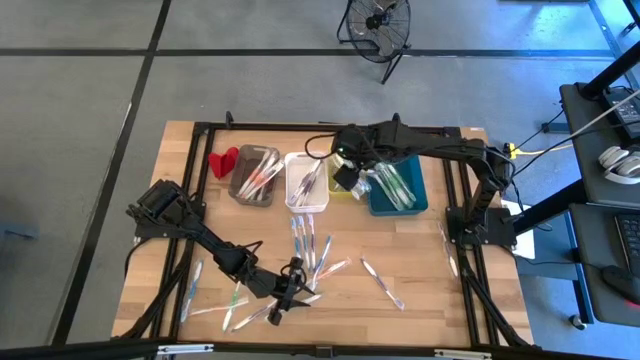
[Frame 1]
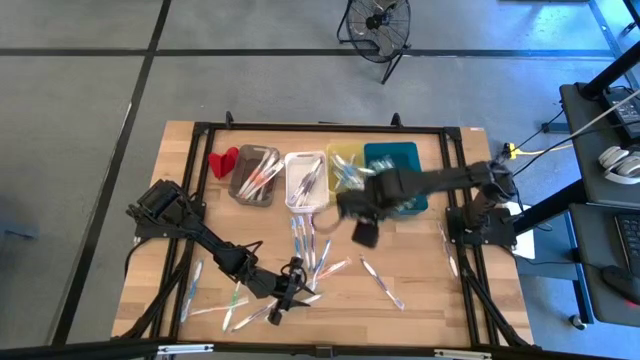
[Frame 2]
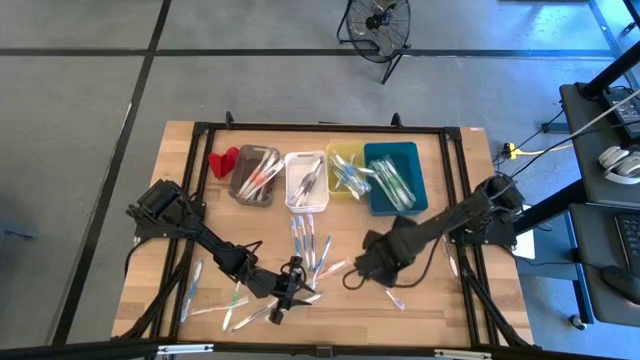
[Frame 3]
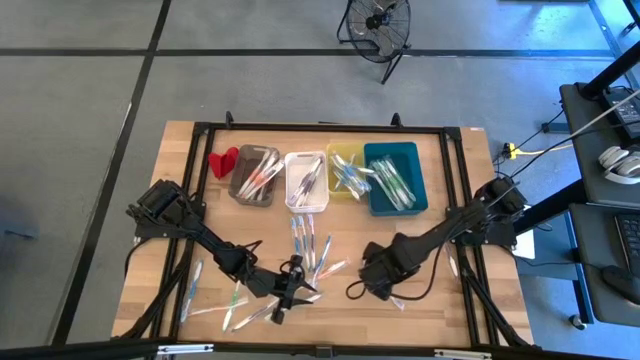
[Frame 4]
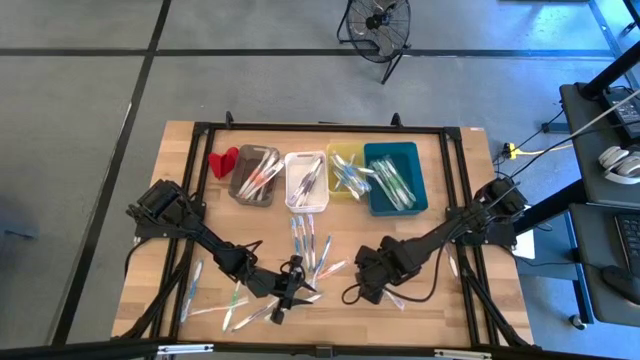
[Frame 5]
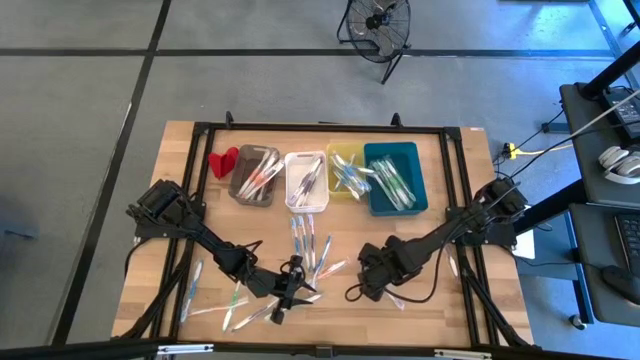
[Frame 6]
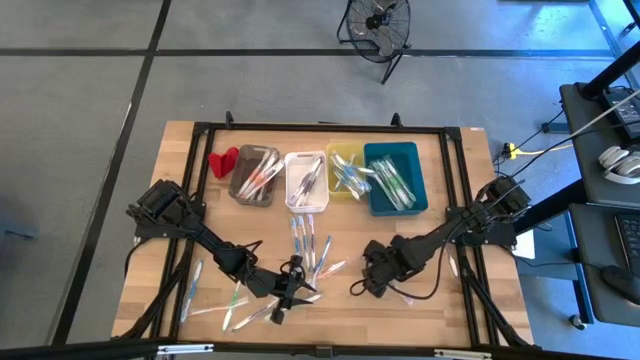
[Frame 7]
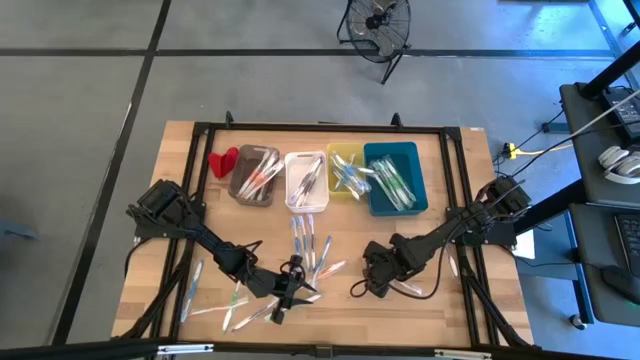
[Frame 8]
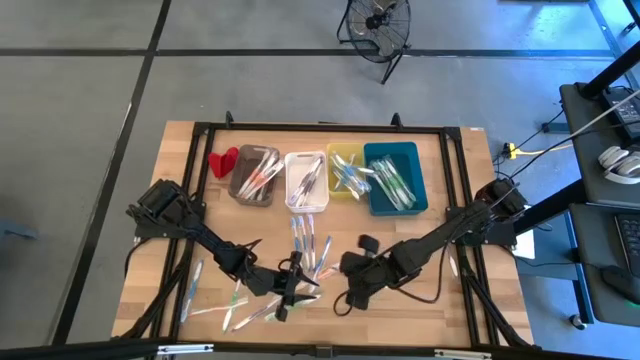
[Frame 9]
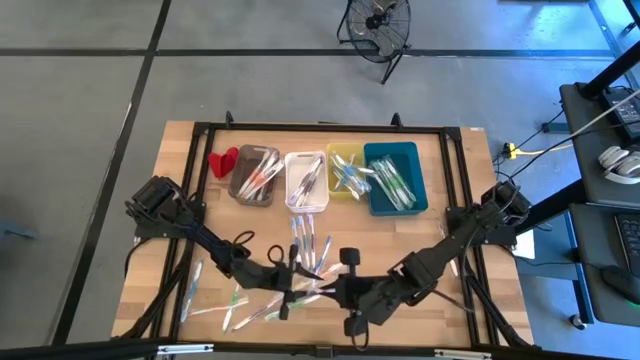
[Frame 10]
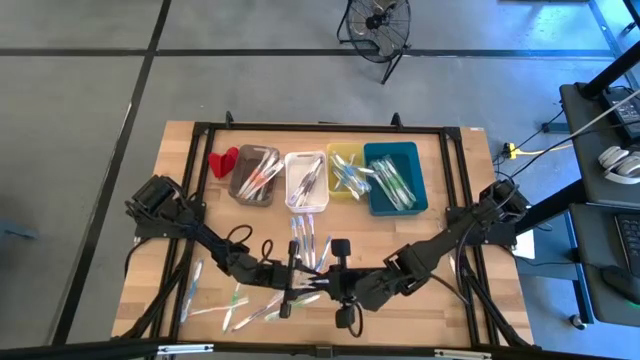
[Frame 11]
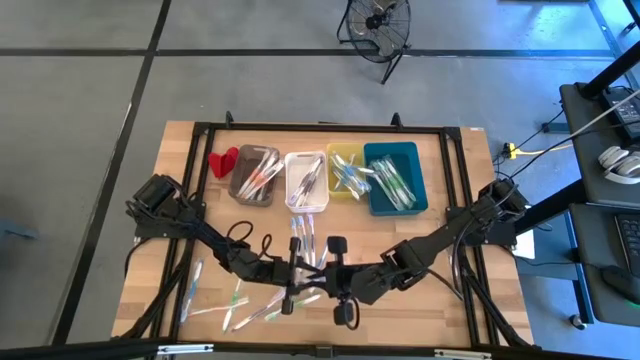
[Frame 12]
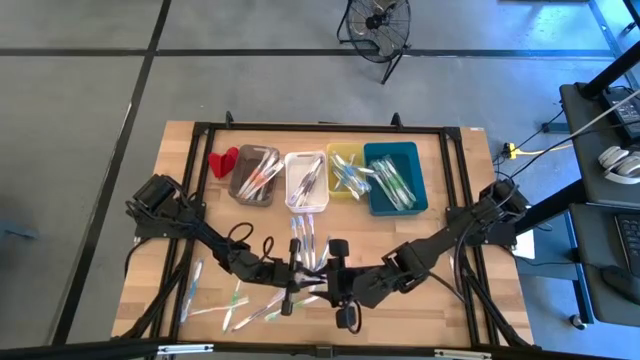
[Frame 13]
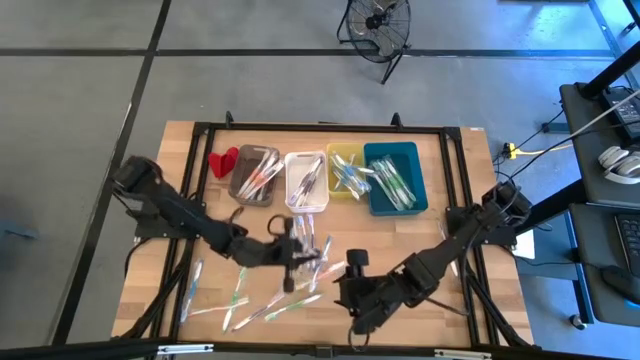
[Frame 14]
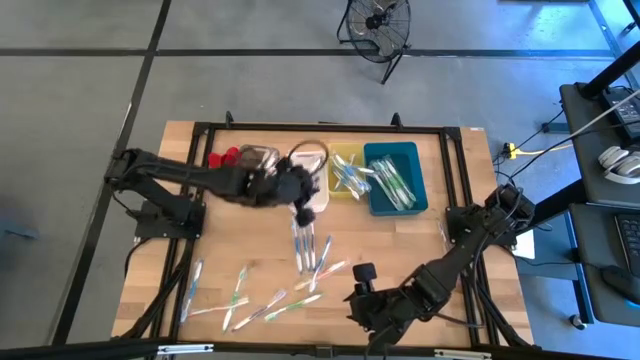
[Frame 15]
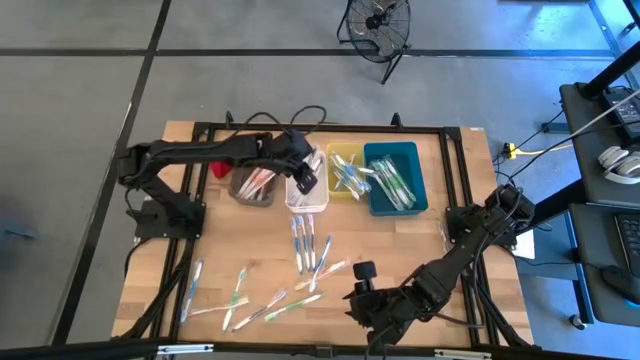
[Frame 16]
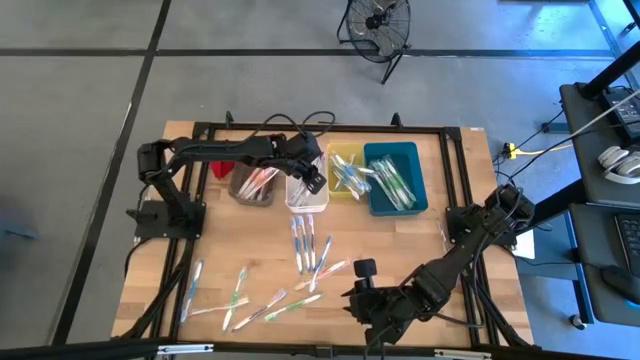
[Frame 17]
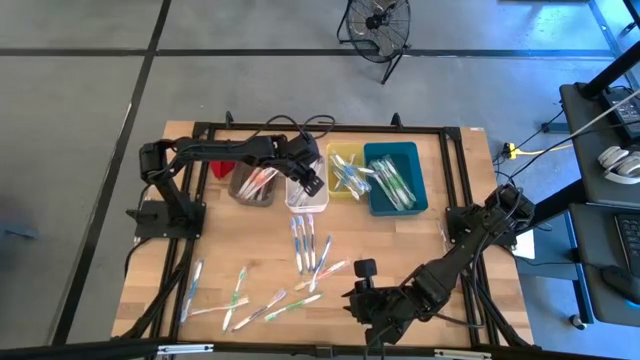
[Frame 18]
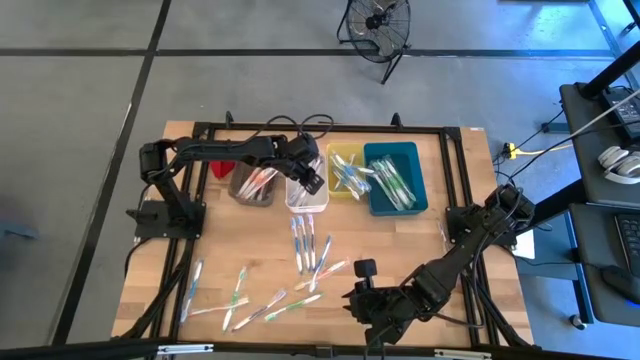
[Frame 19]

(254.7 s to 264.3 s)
Task: Pick & Place Toothbrushes
Put the purple toothbrush into the white bin

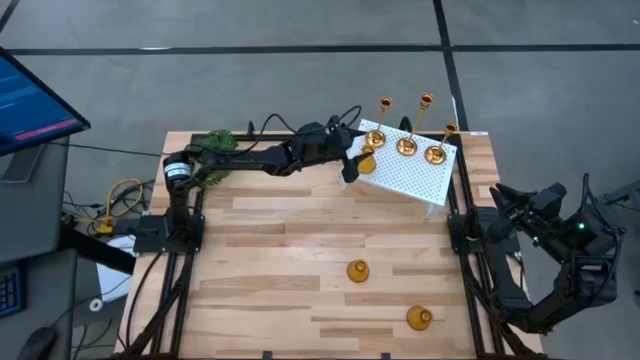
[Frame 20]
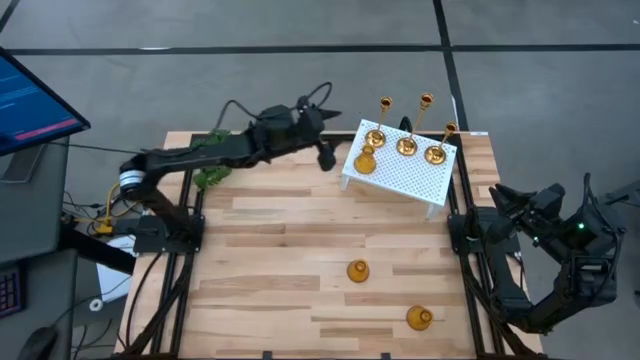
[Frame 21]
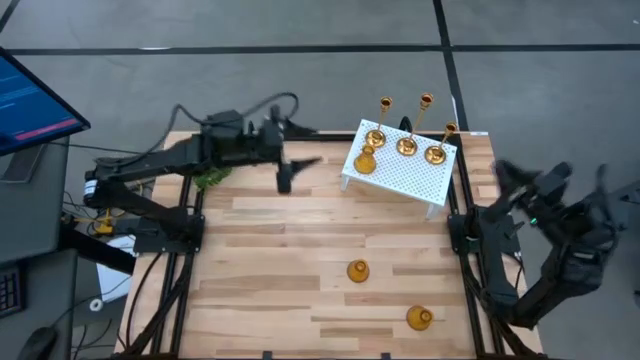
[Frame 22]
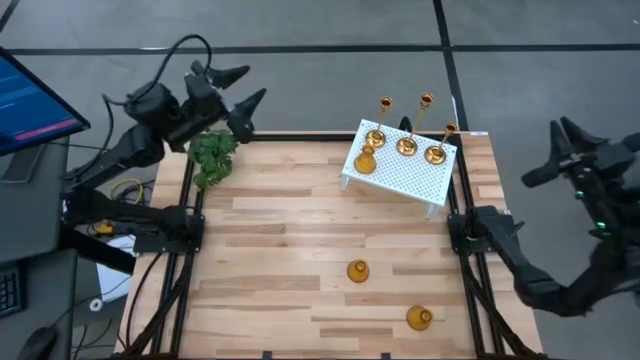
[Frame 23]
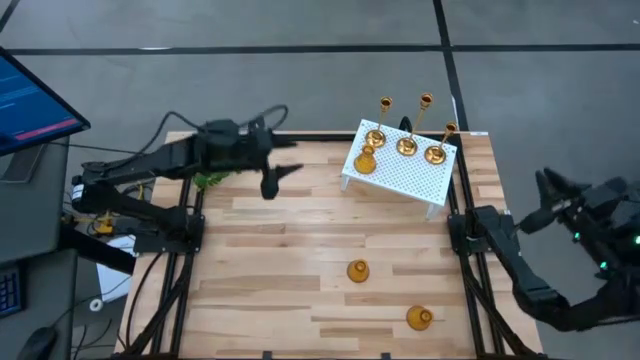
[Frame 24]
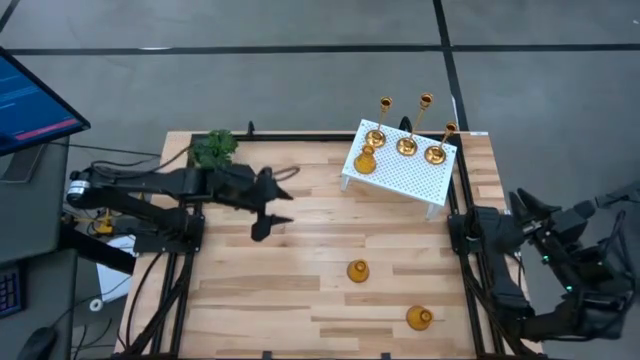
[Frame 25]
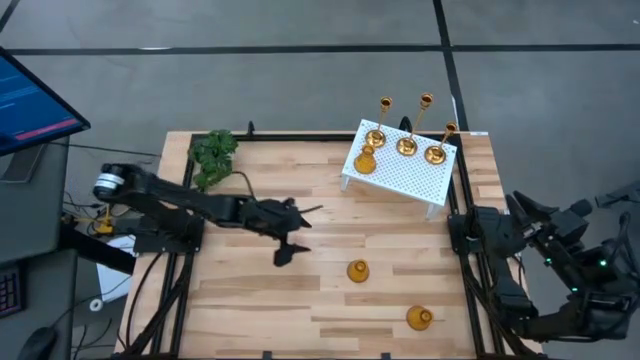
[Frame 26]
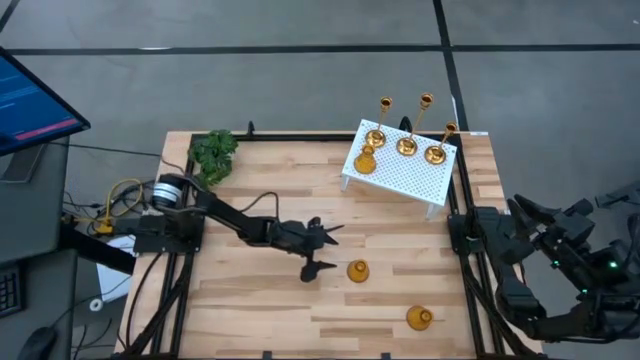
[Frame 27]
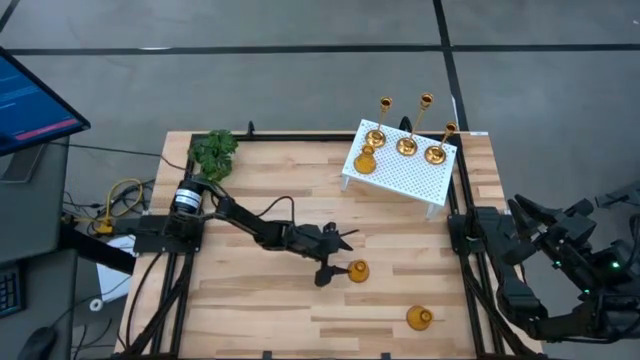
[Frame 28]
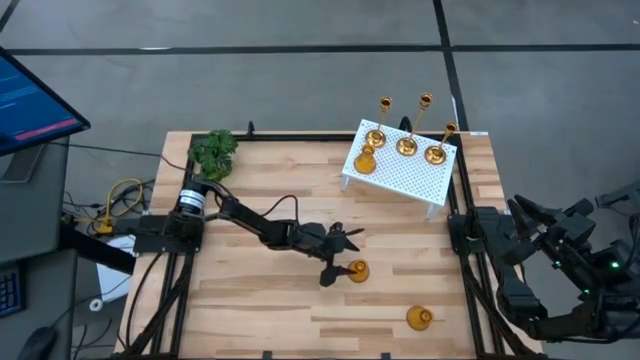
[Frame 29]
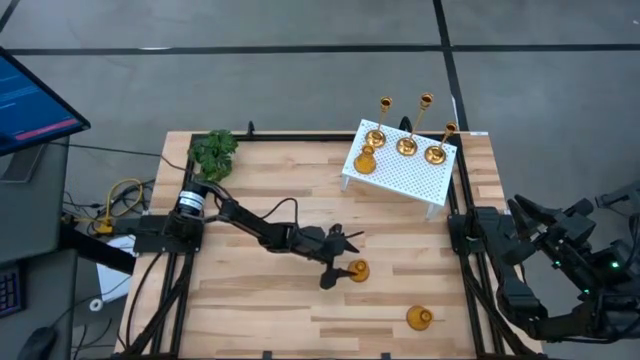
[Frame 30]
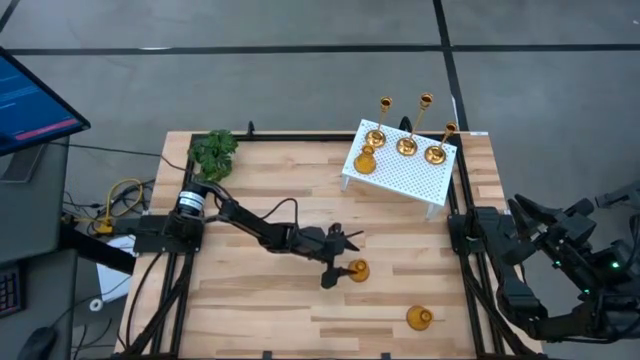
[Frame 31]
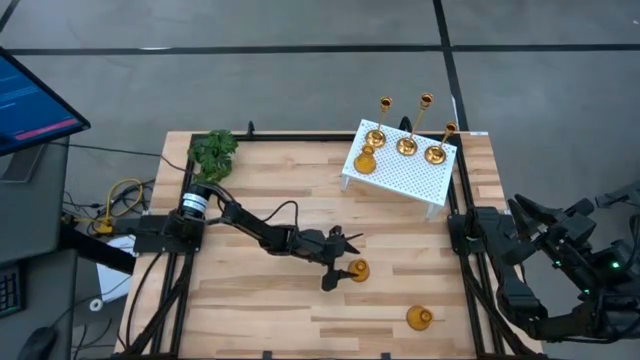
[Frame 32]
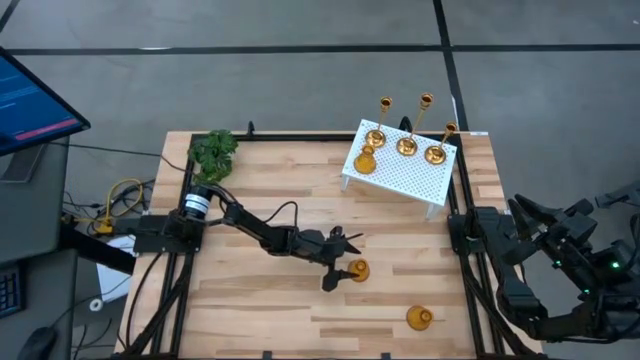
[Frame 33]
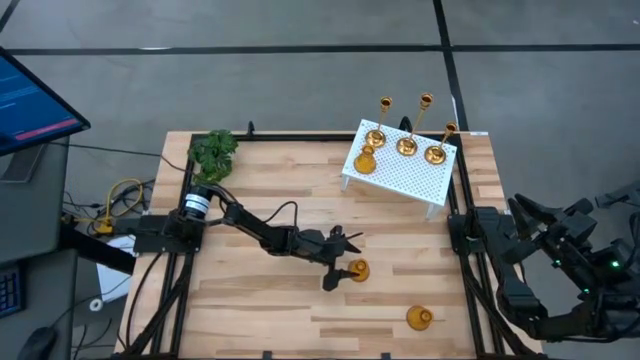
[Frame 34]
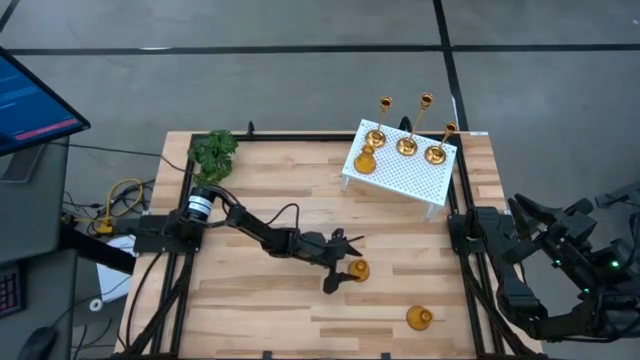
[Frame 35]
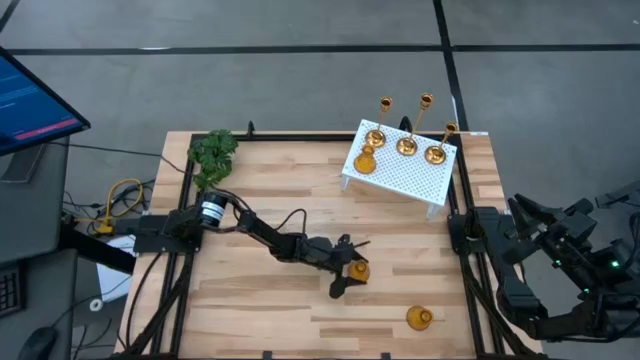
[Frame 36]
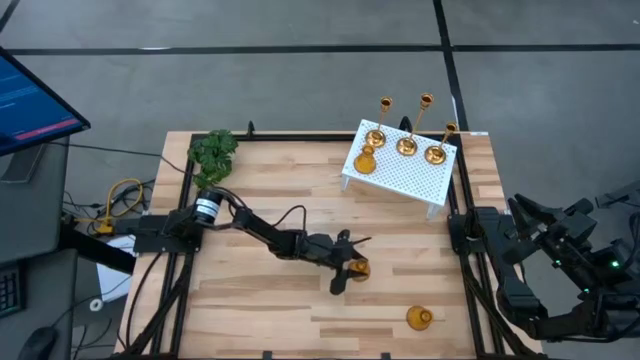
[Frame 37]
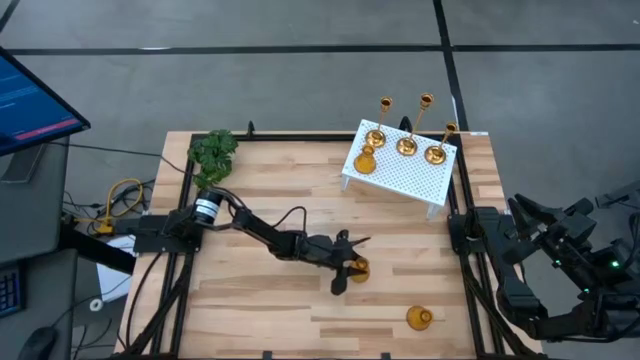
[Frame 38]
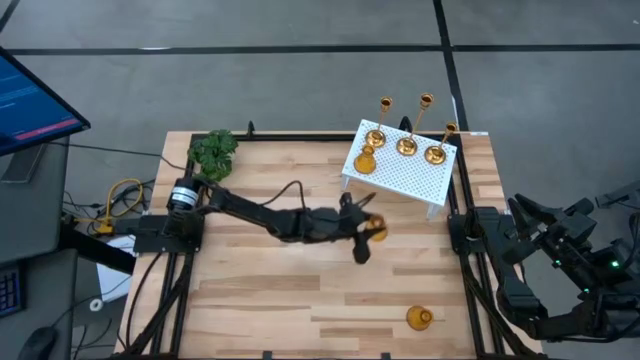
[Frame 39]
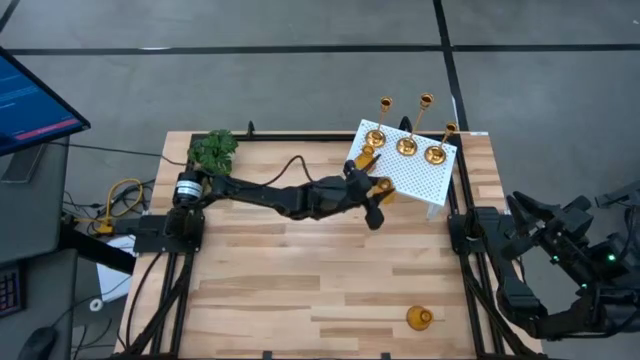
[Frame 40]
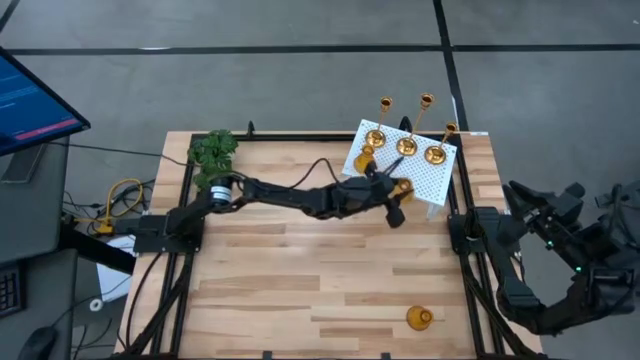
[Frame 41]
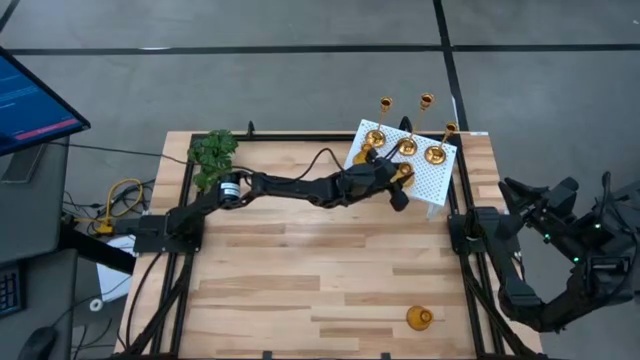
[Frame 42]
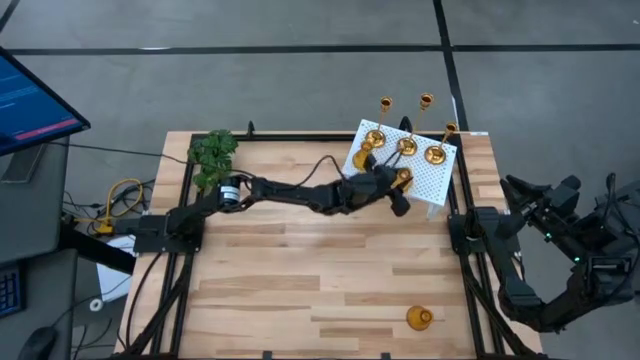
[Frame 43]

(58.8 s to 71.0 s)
Task: Pick & Place candle stick holders
Put the top yellow candle holder on the shelf aligned with the other yellow candle holder
